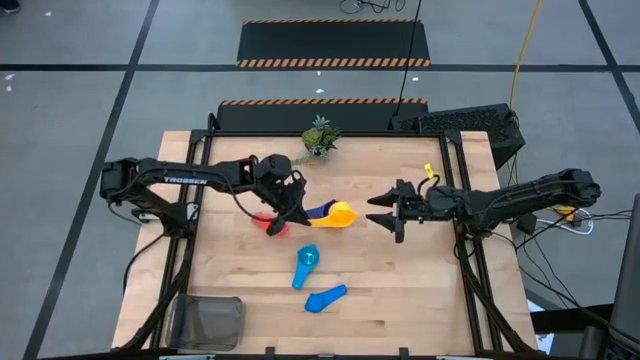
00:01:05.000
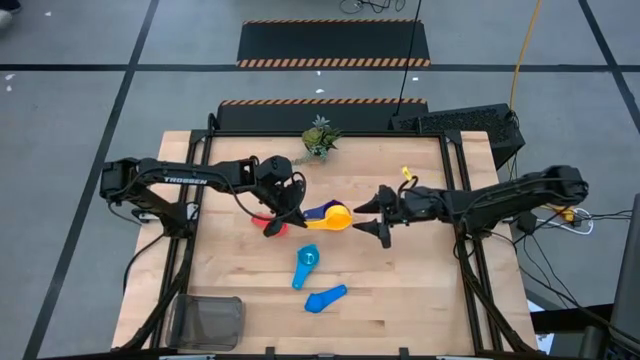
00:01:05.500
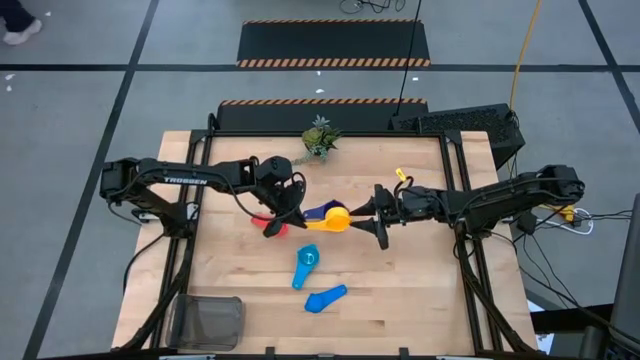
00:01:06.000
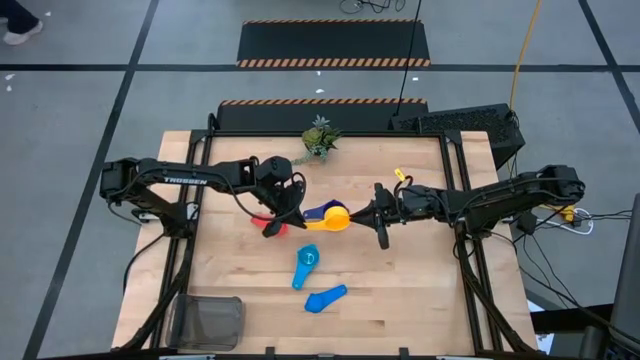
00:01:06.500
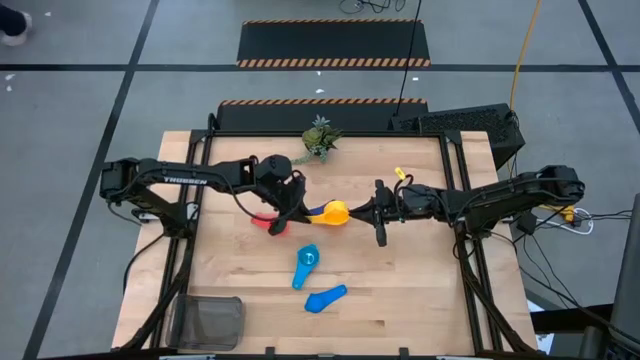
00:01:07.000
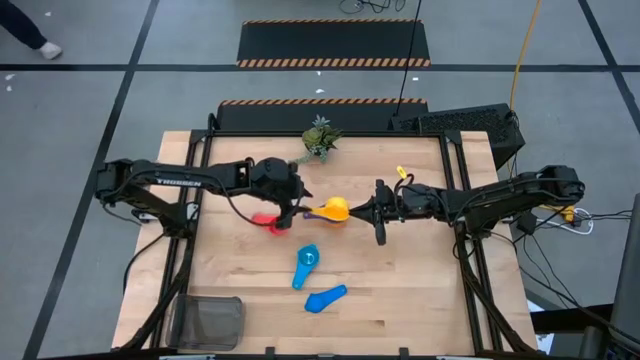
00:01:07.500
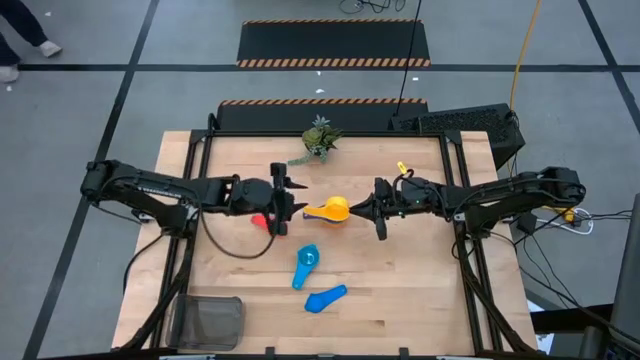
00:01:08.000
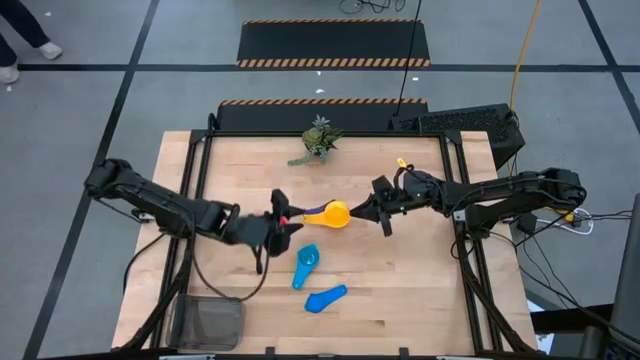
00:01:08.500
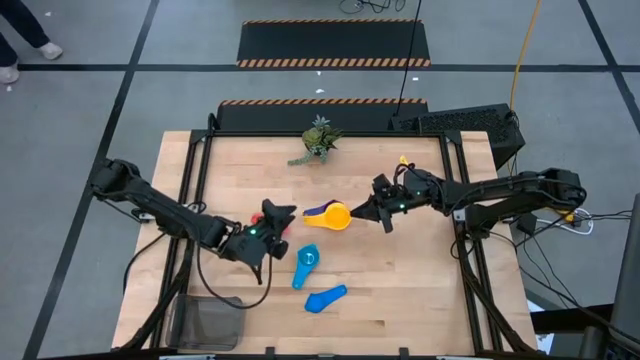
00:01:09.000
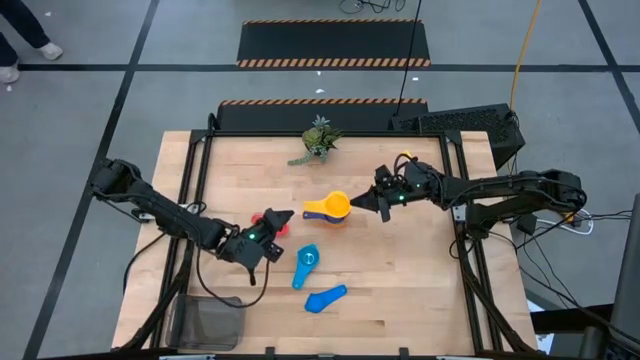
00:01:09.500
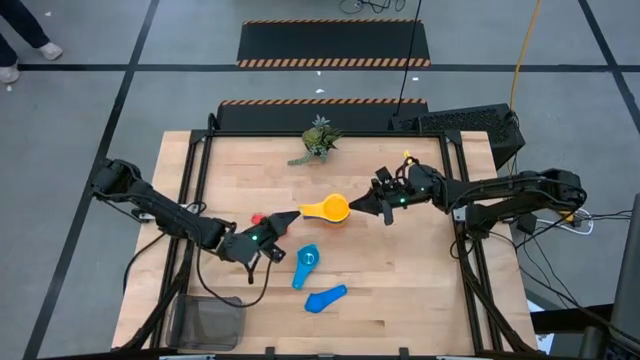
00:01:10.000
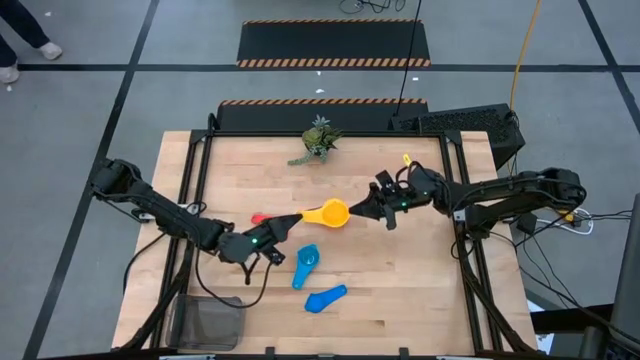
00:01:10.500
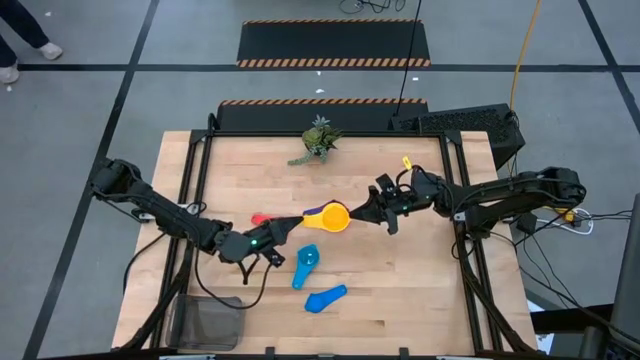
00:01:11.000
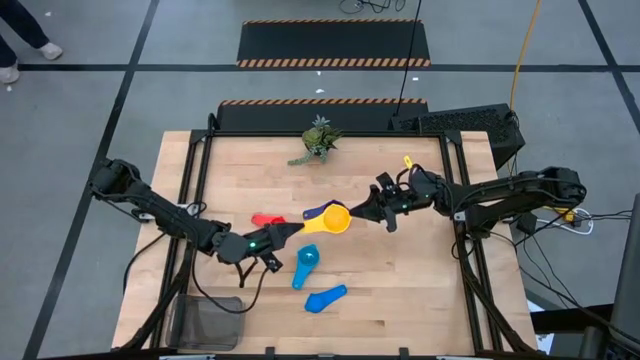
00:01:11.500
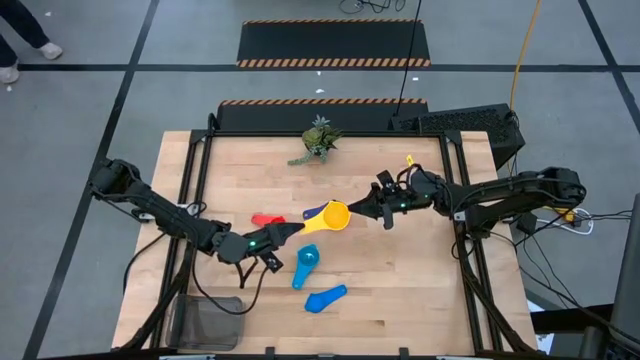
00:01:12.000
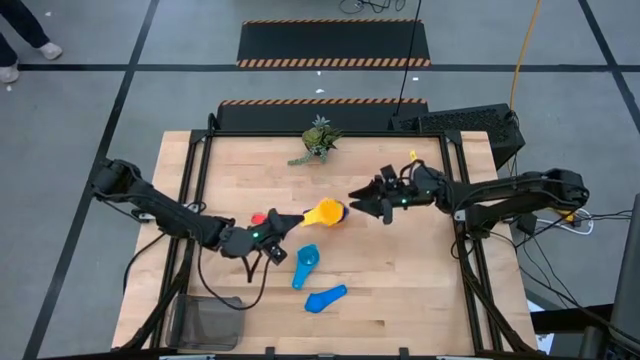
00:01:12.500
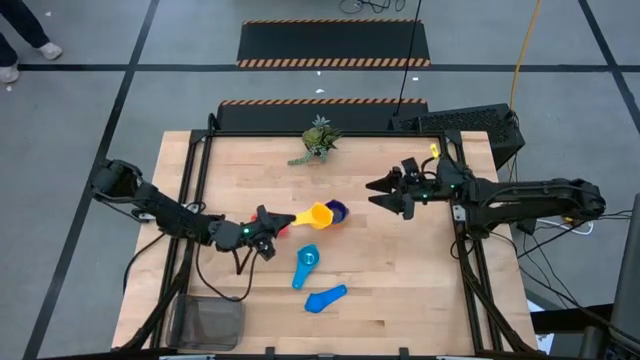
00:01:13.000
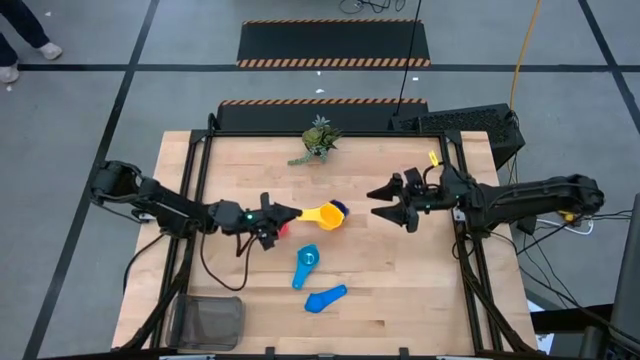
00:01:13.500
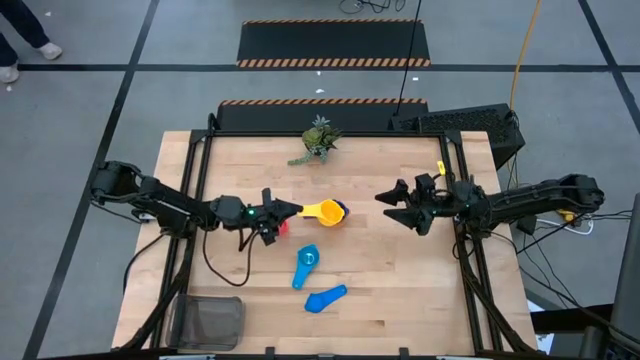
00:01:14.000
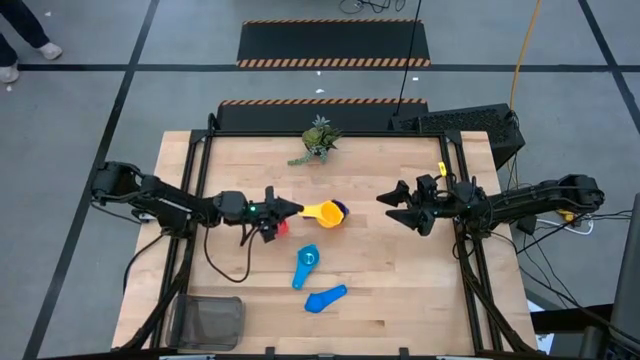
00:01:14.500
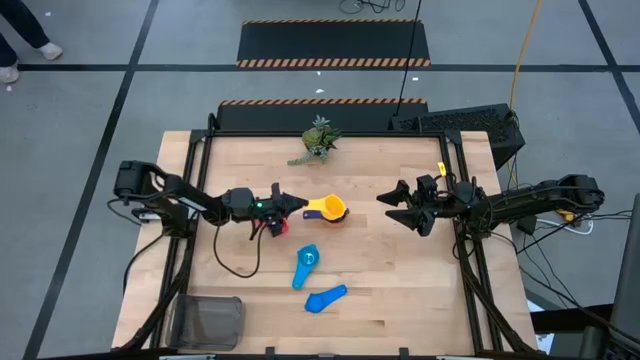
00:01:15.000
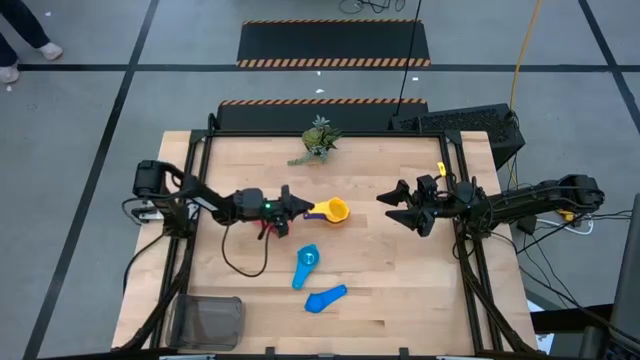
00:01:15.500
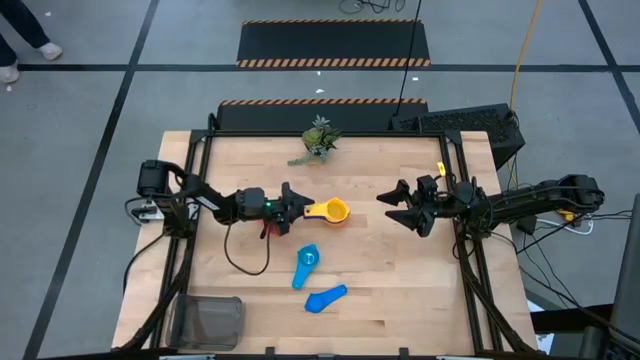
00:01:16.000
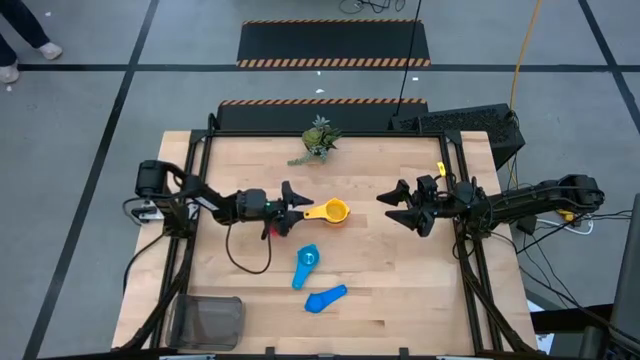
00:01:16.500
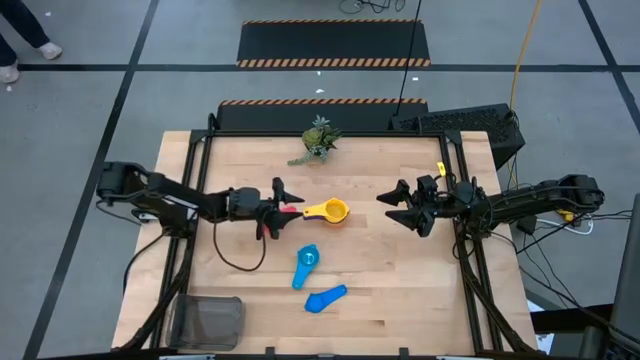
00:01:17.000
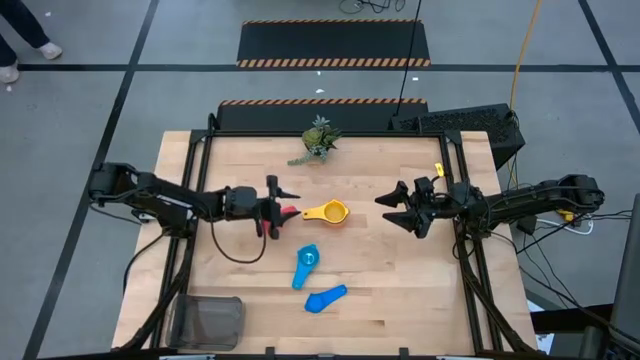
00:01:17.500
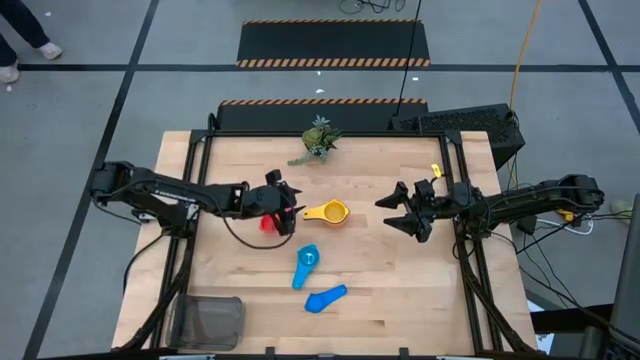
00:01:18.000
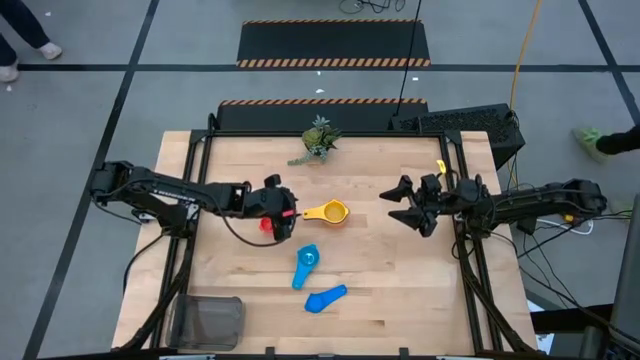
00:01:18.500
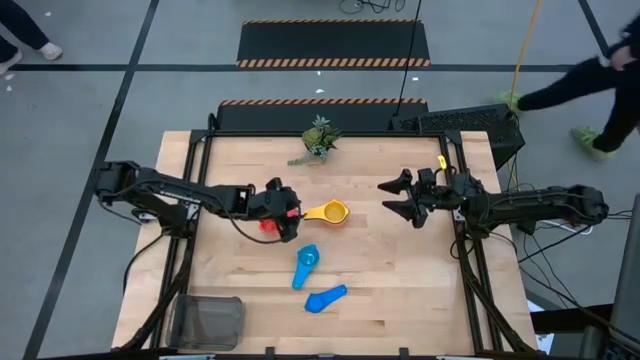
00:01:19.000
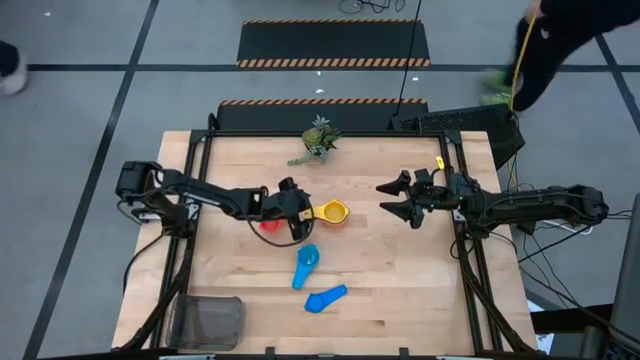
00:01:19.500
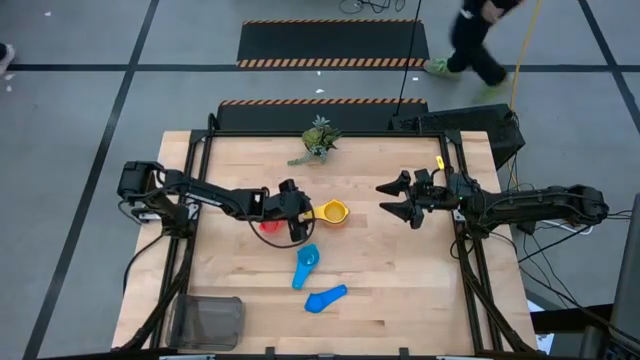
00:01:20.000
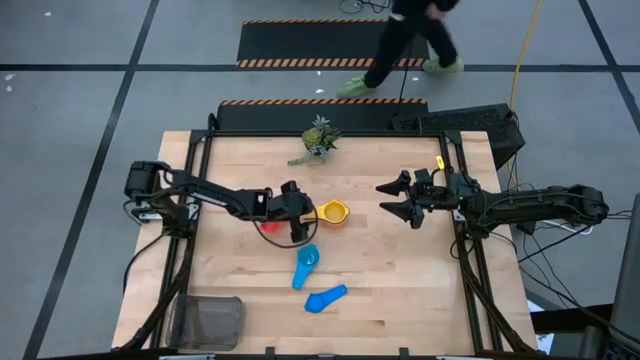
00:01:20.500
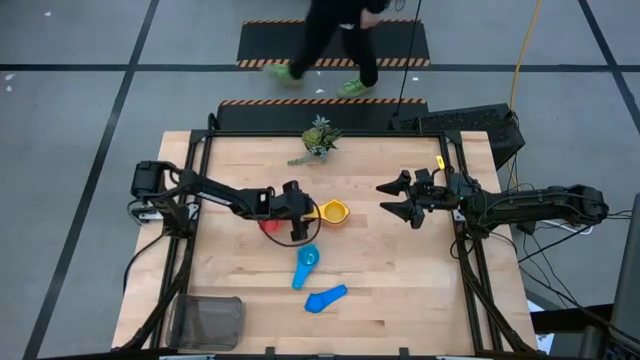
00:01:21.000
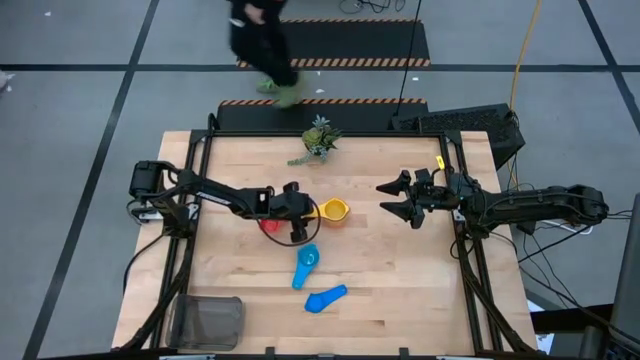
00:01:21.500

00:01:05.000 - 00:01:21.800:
Task: Nest measuring cups in basket
Stack the yellow measuring cup on top of the dark blue measuring cup

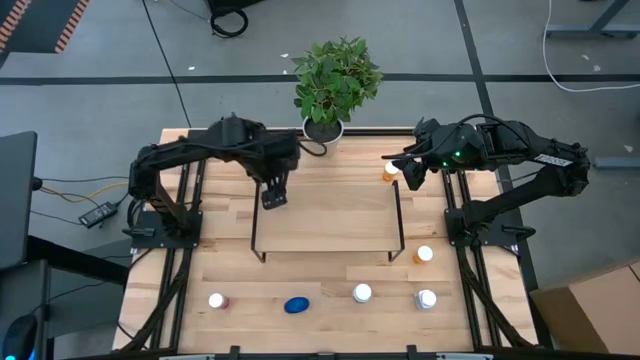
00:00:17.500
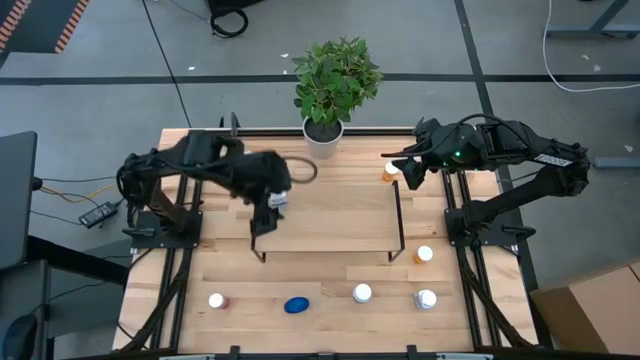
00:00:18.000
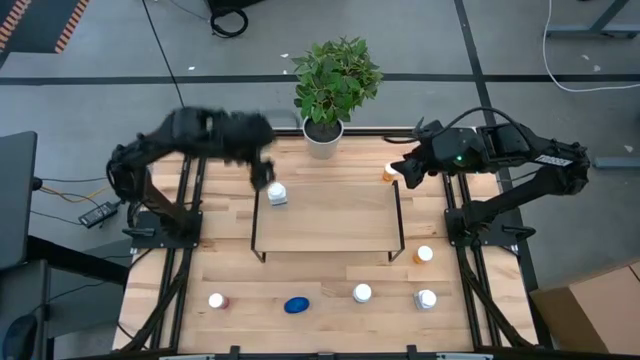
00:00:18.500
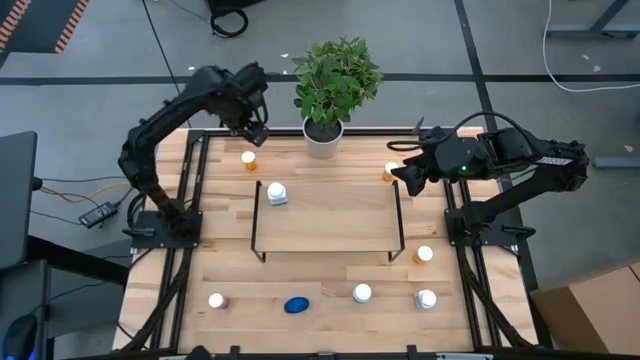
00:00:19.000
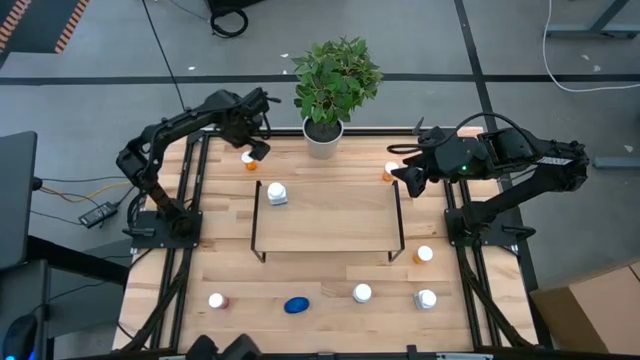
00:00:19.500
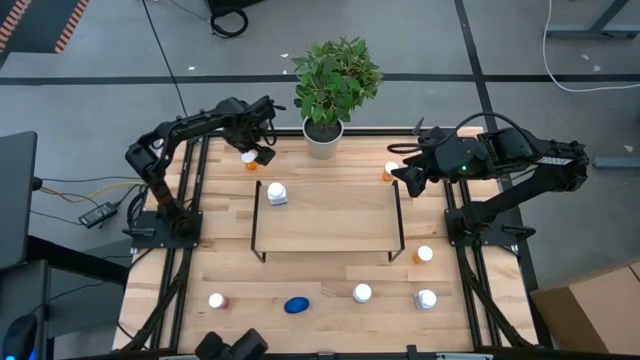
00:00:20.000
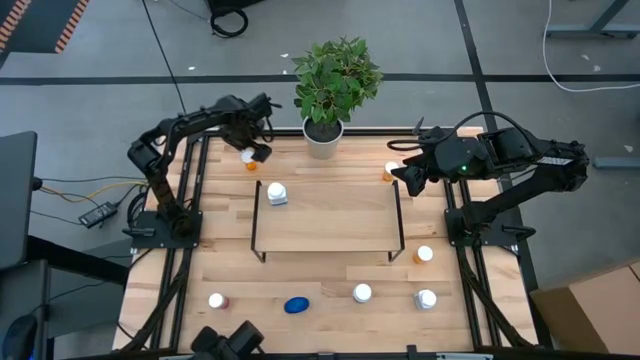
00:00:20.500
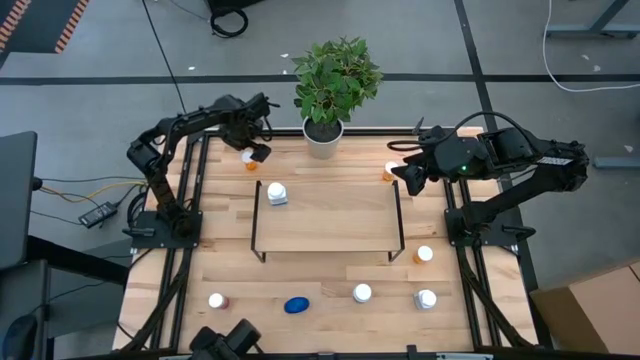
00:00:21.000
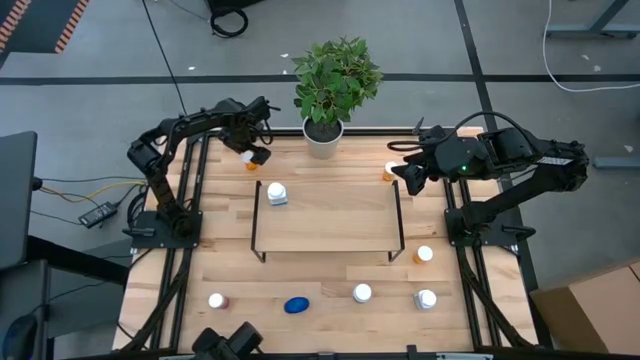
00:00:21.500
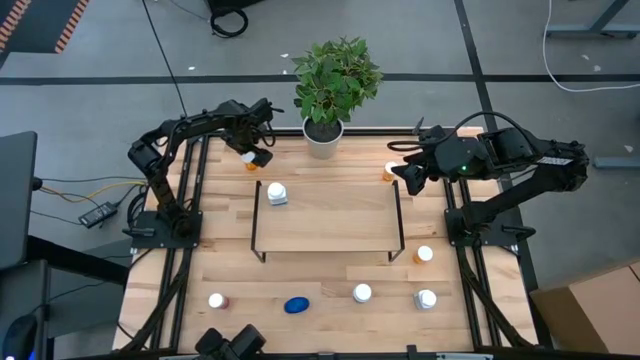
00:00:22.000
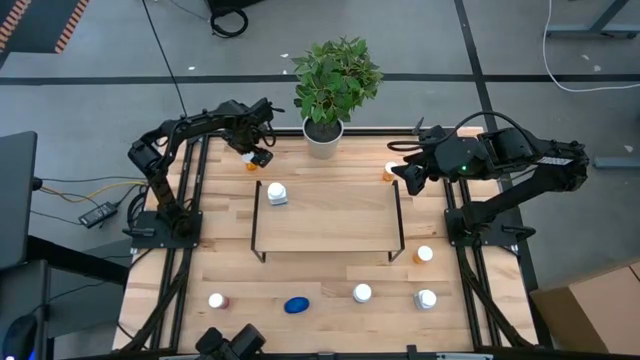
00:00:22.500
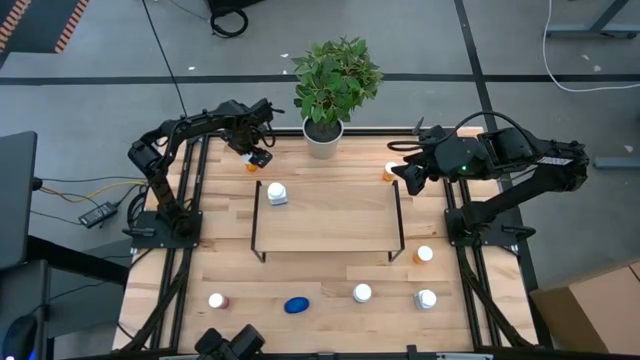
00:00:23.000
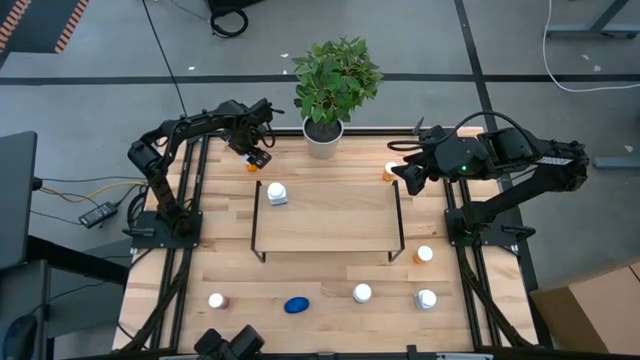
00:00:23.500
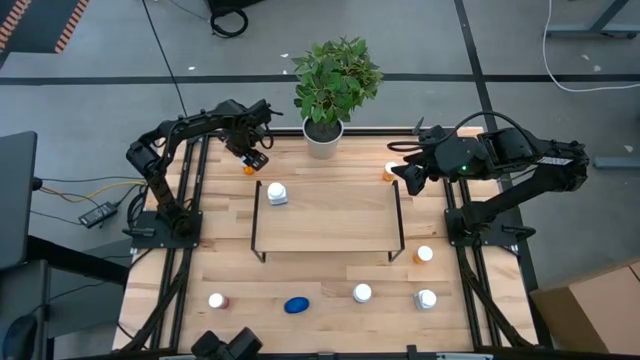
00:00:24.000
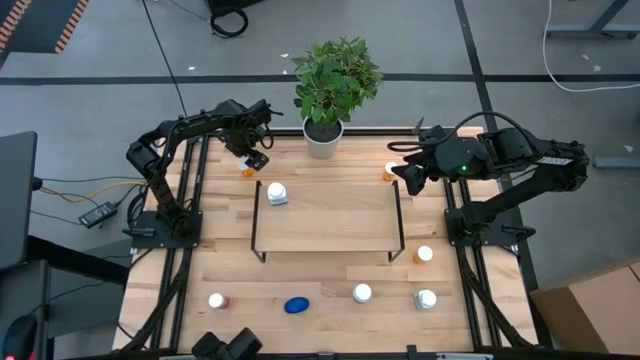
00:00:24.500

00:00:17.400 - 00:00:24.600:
Task: Pick and place medicine bottles onto shelf by color
Put the top left orange pill bottle on the shelf
